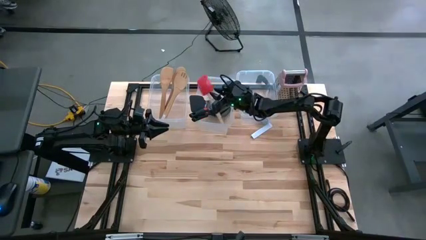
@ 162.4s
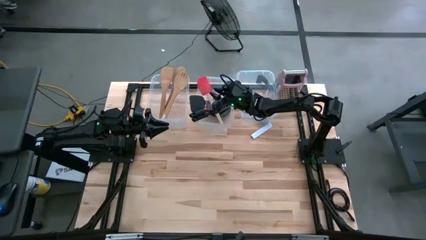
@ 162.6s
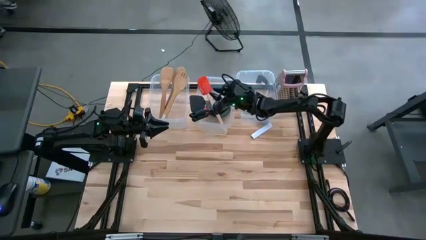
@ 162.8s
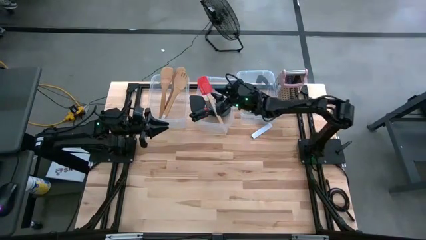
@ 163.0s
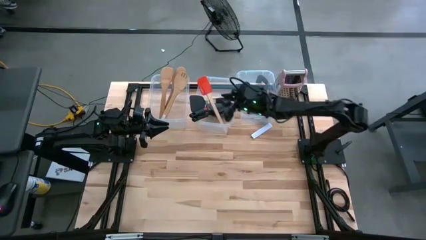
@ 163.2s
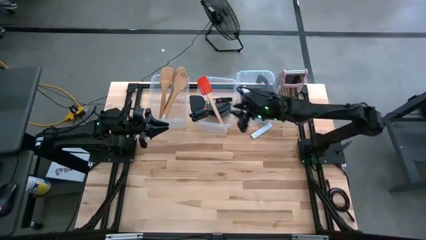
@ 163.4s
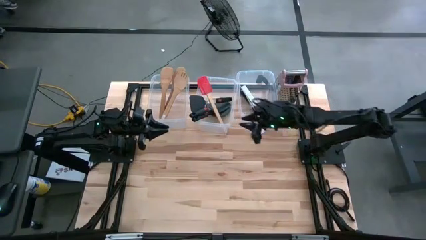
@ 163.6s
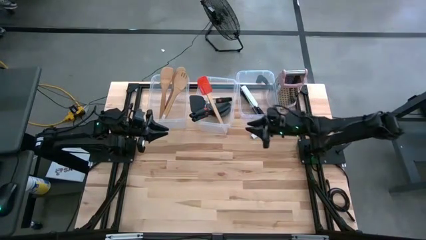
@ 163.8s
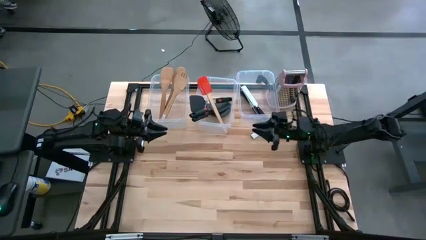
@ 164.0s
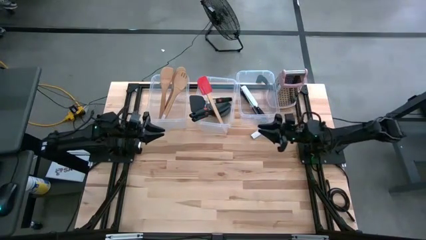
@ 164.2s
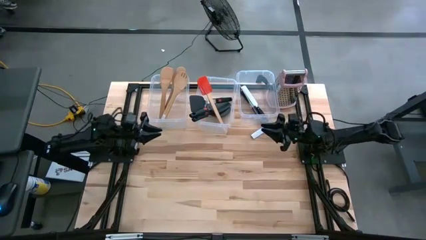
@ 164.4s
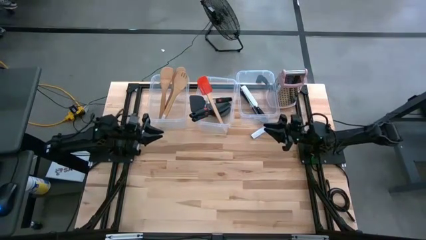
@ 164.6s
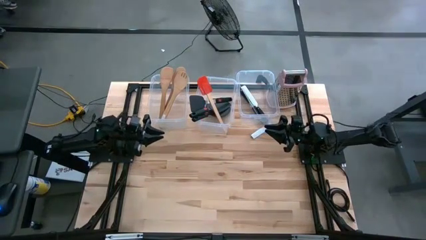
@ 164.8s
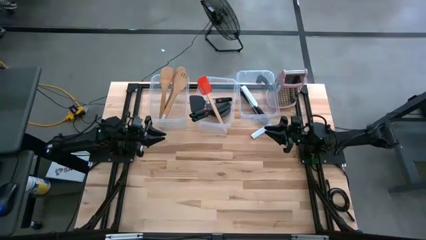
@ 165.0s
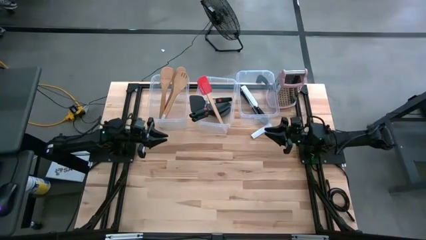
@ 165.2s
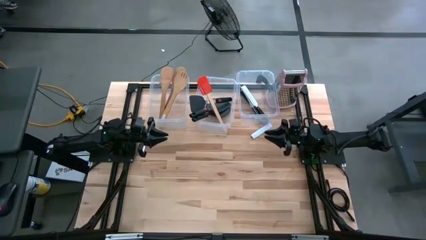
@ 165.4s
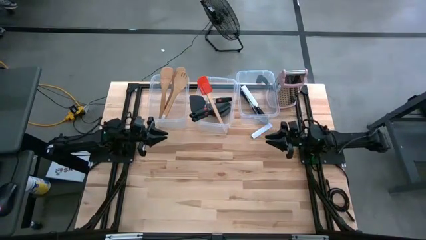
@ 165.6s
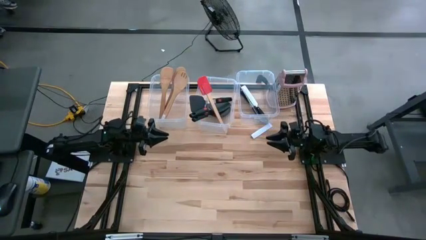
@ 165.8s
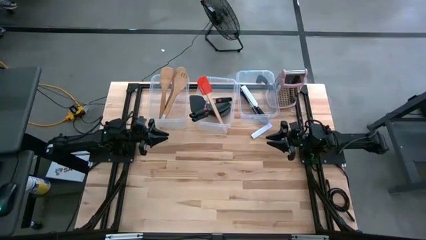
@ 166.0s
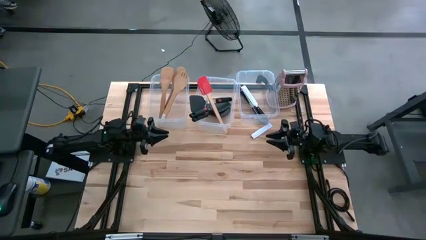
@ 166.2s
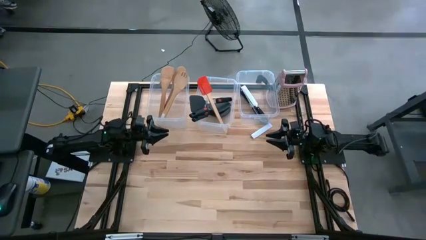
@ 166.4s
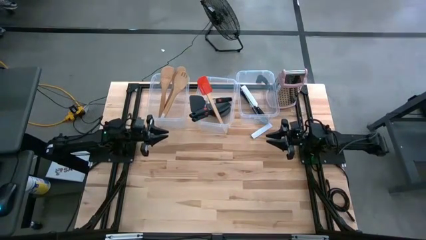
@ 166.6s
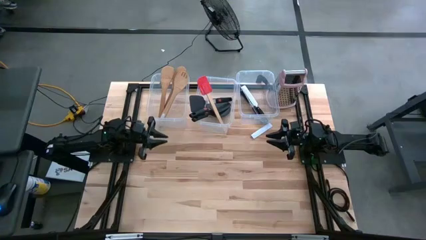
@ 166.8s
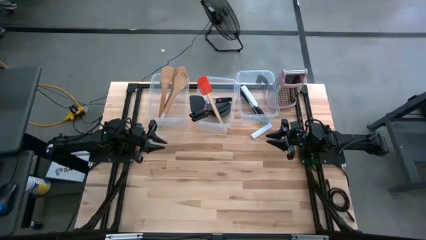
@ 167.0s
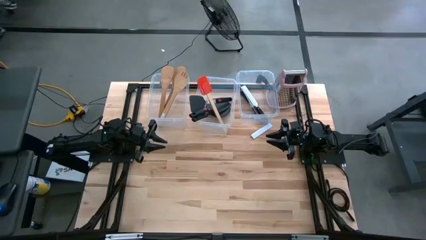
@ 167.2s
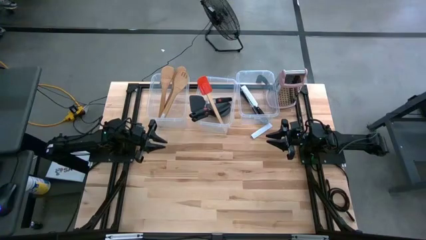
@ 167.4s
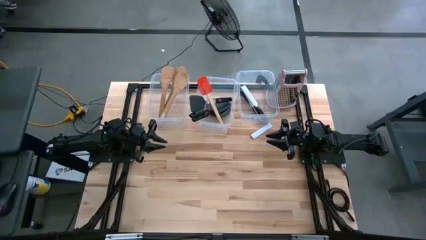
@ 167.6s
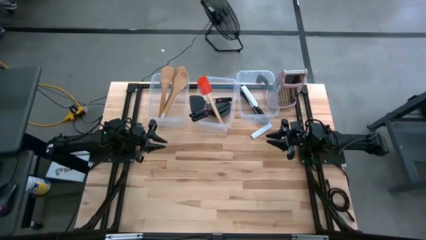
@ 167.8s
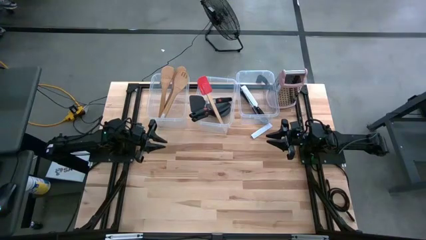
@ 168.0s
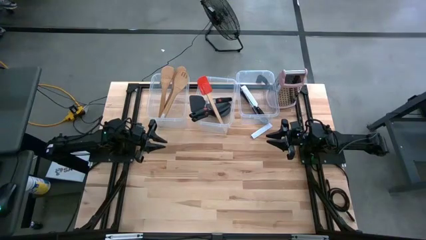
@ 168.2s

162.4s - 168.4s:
Task: Pick & Place Kitchen Items
Return to Home Position

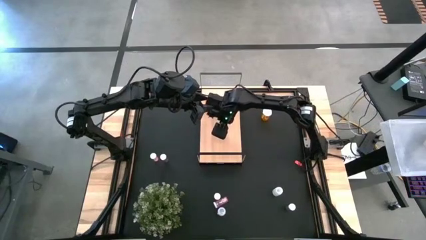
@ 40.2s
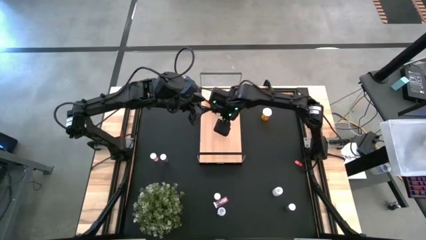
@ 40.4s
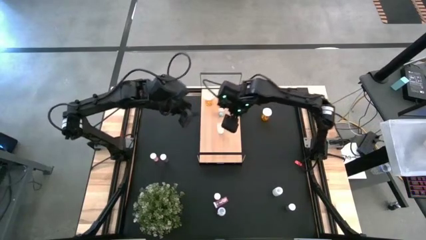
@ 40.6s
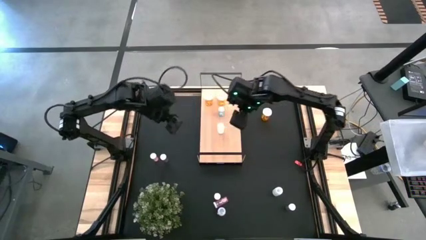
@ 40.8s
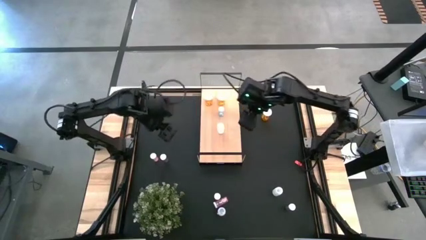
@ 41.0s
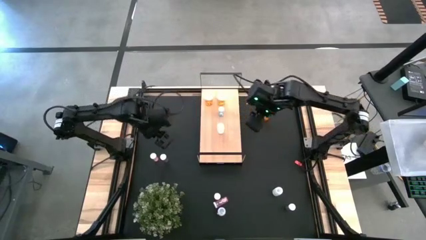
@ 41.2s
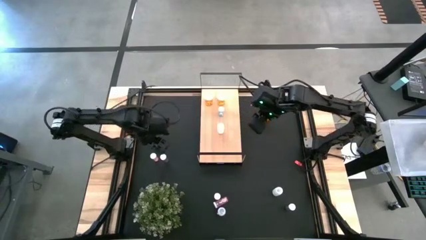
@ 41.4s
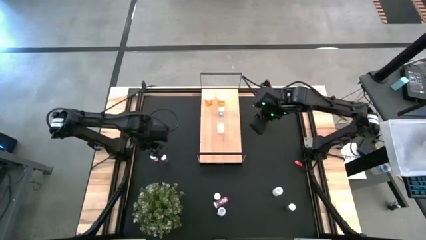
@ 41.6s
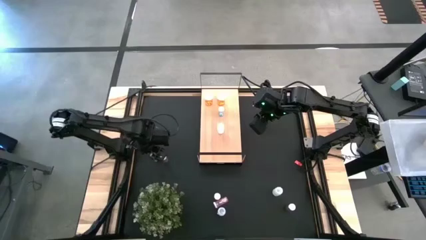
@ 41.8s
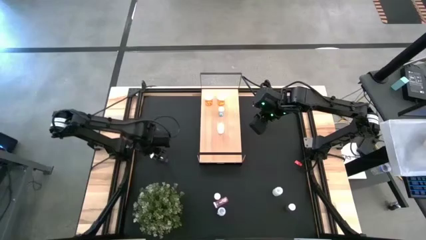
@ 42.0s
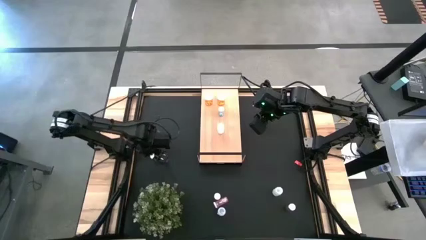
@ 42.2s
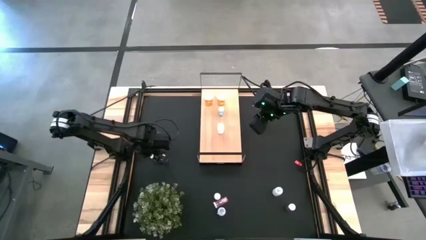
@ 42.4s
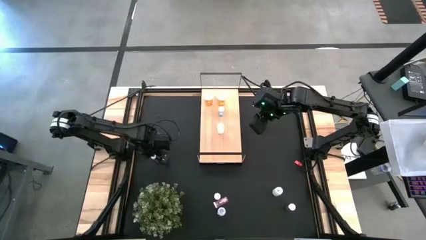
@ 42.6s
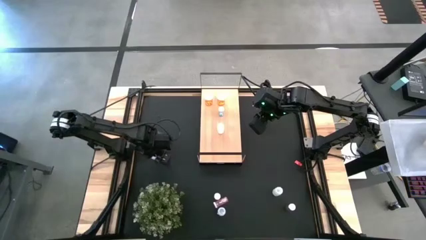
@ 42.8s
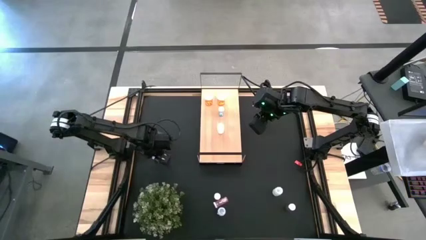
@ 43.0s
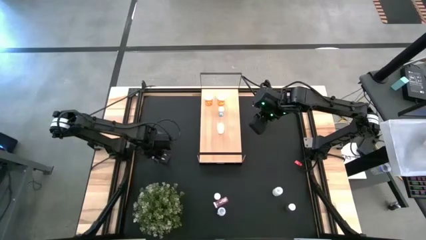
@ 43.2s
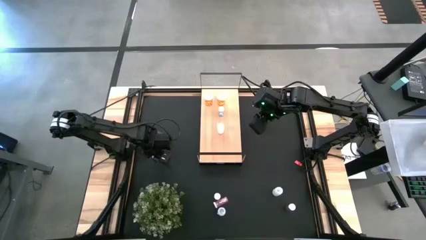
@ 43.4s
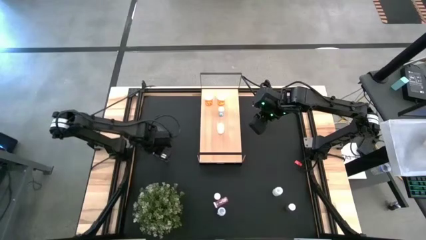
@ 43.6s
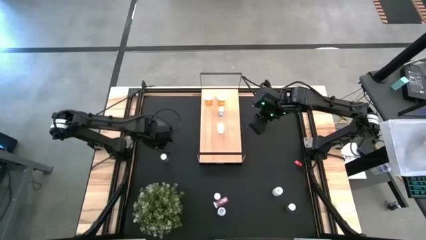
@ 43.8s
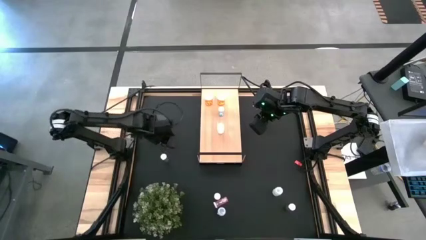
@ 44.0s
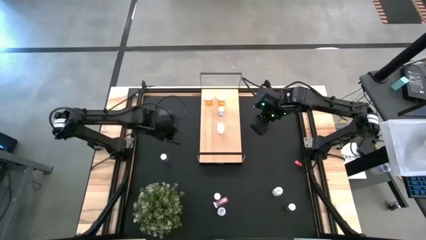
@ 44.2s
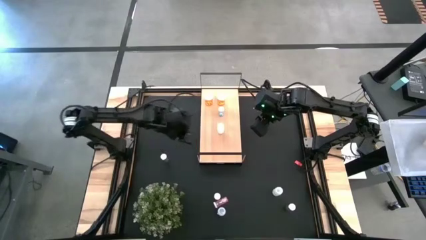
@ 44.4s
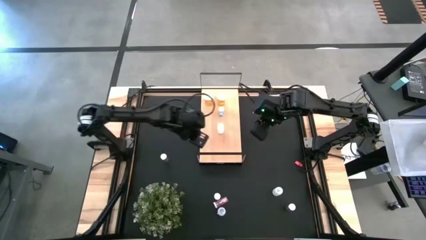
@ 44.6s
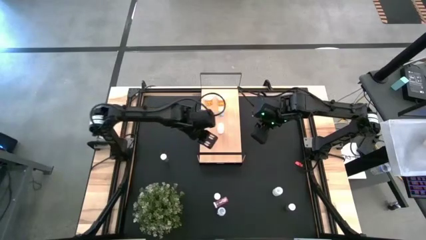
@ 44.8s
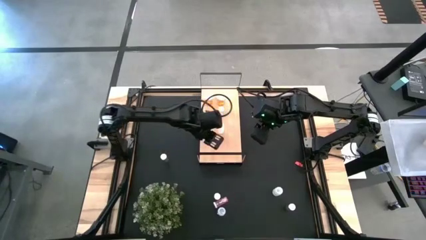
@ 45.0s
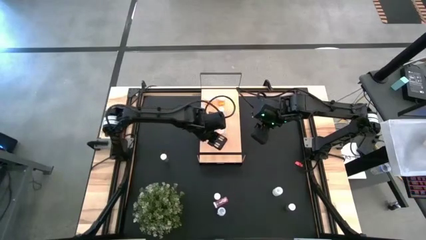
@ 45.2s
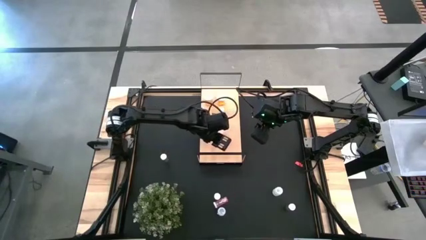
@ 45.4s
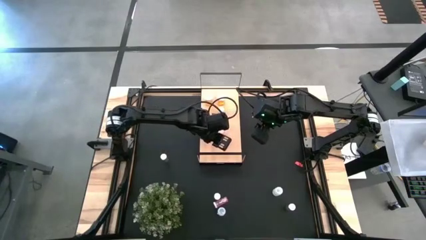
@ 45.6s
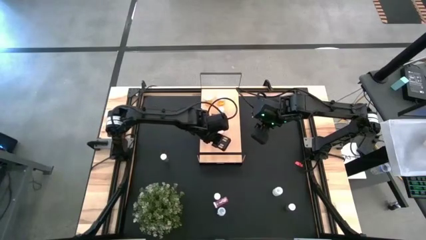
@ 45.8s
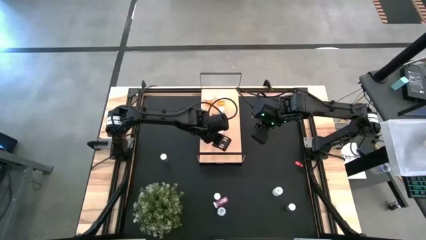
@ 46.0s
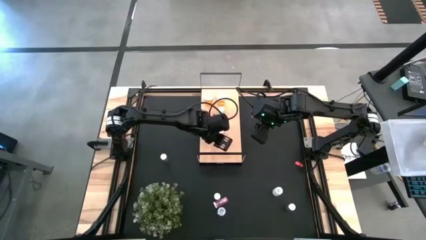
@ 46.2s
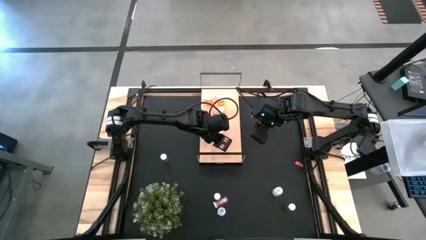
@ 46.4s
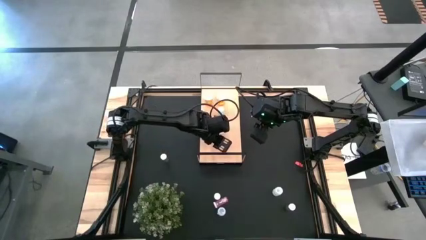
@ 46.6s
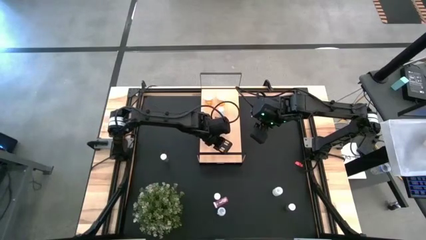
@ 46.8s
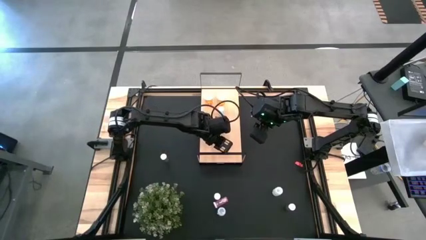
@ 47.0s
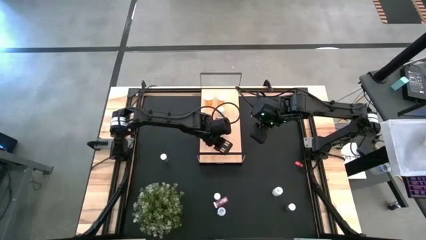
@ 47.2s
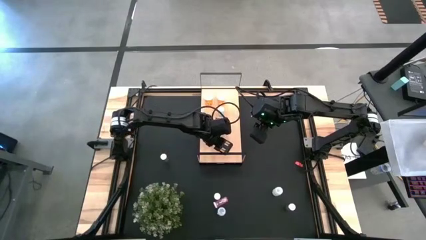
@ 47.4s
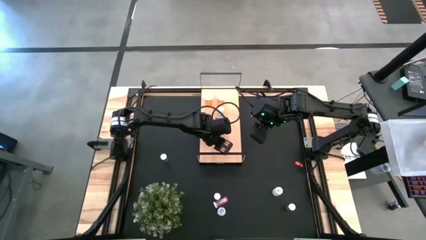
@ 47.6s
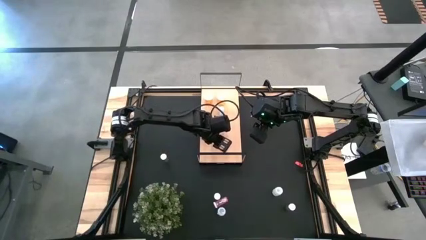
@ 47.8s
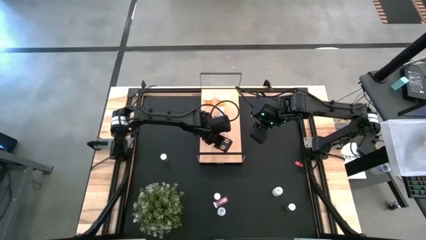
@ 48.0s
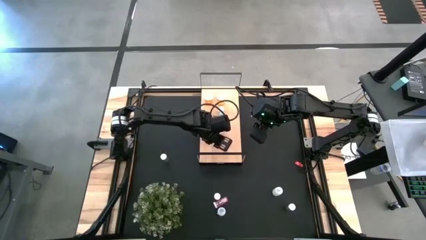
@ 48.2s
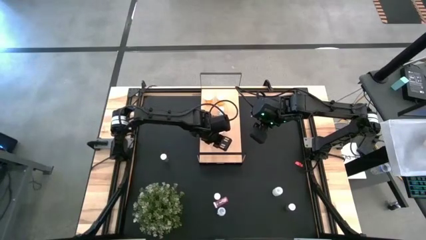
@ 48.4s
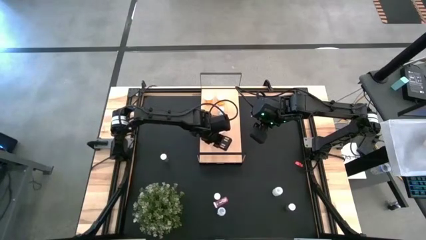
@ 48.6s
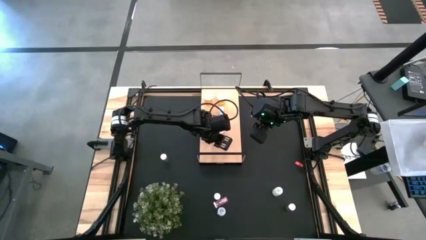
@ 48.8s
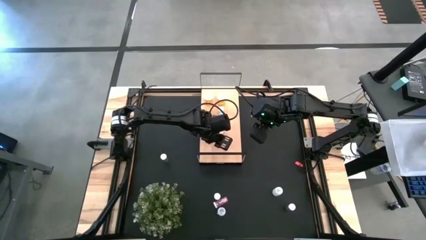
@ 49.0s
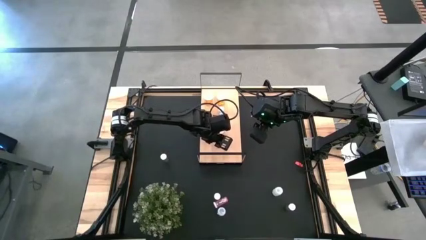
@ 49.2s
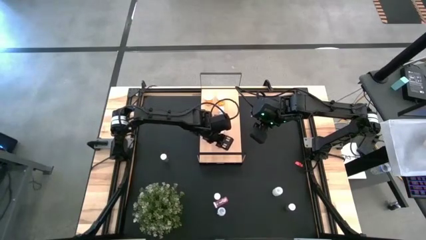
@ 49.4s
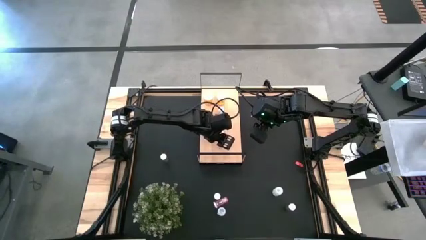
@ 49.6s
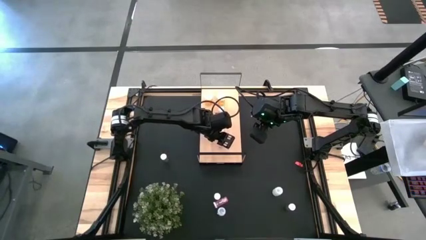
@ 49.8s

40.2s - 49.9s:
Task: Pick and place medicine bottles onto shelf by color
Put the top pink pill bottle on the shelf
